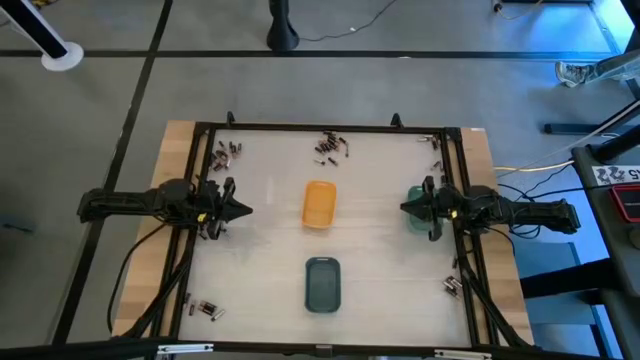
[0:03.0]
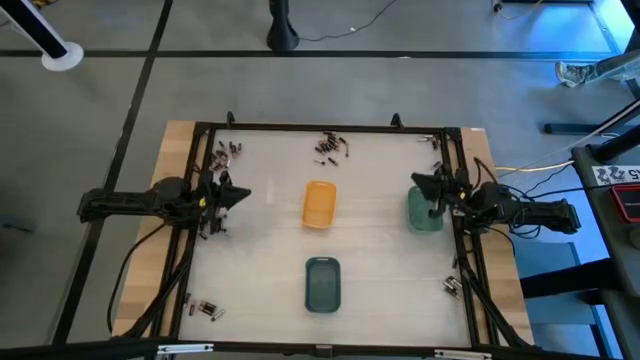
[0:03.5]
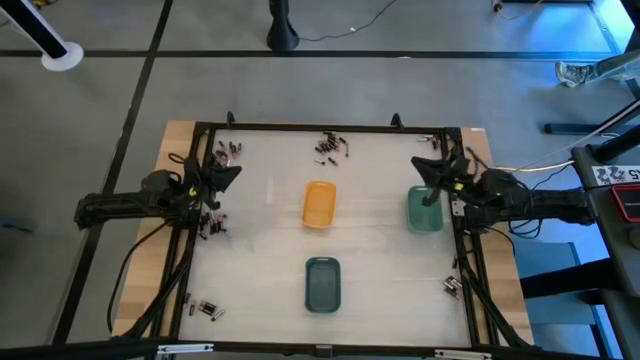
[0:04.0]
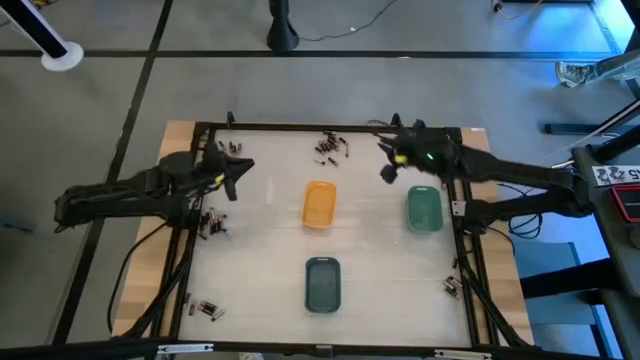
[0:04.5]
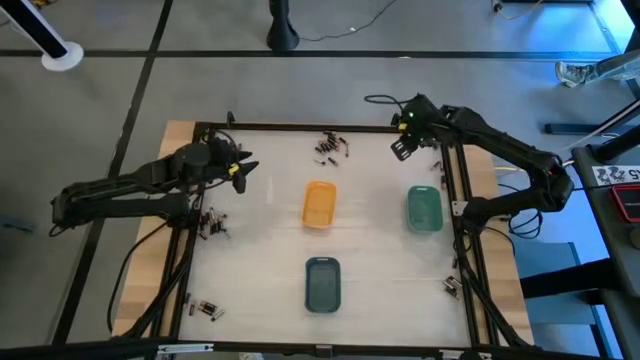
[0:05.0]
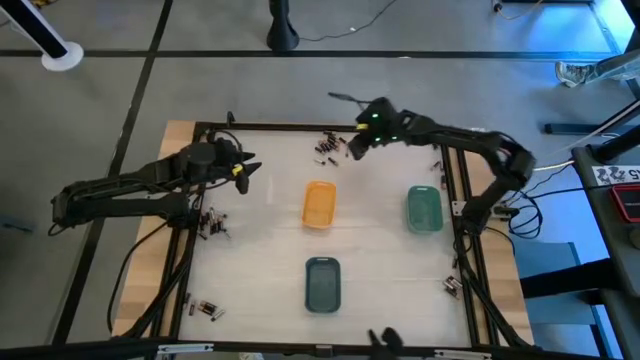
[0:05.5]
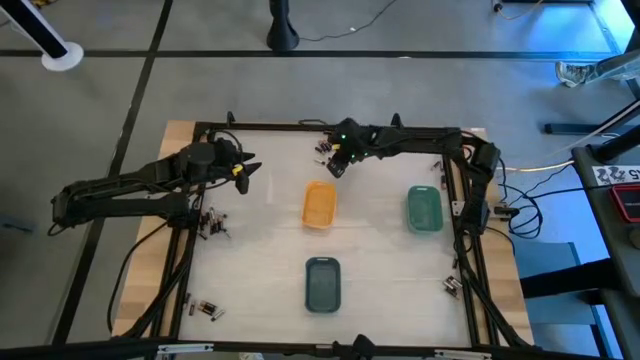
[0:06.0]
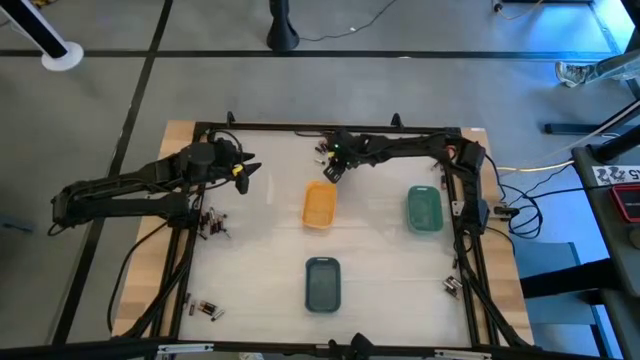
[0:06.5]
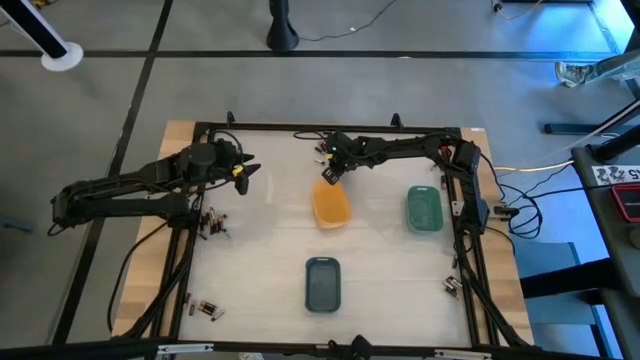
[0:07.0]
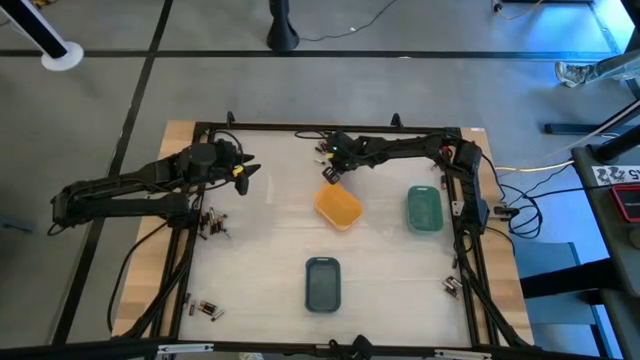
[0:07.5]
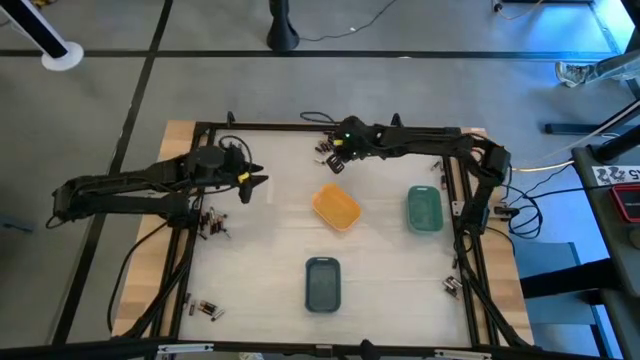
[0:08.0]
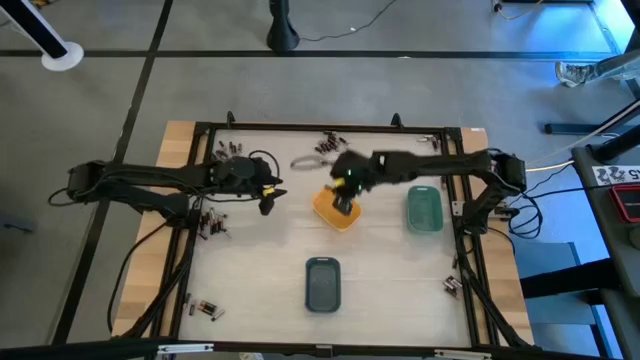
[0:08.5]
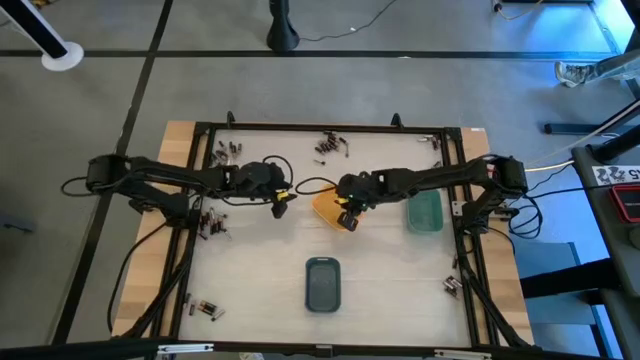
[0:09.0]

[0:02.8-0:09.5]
Task: Sort batteries
Put the black battery into the yellow bin

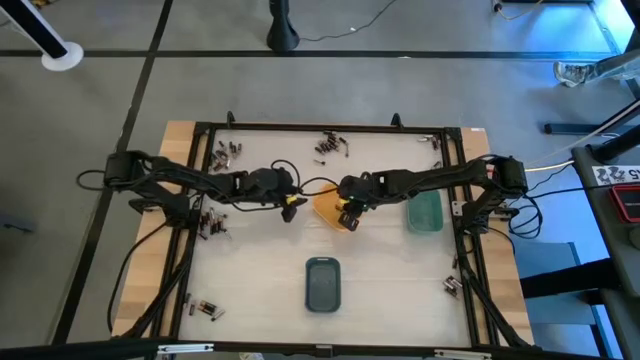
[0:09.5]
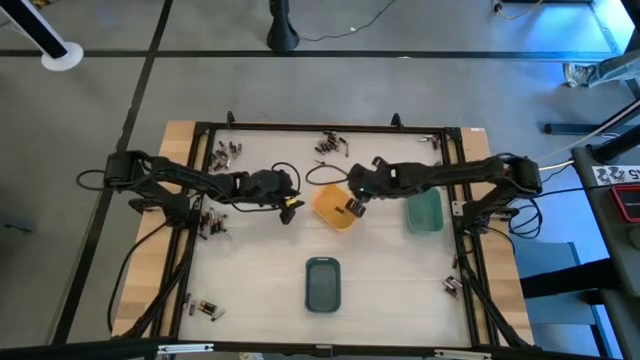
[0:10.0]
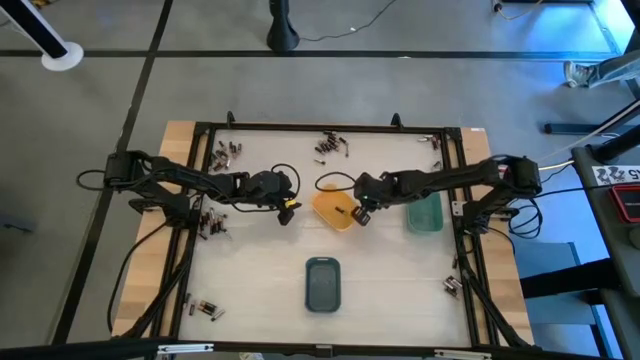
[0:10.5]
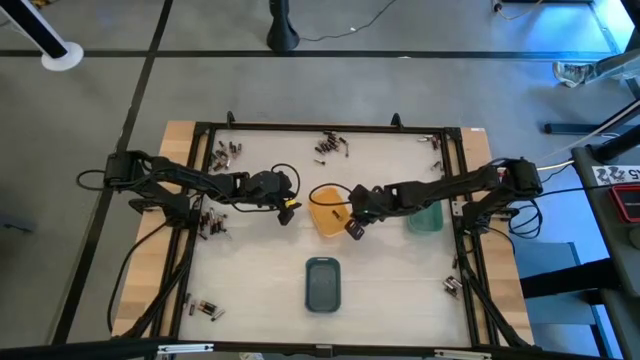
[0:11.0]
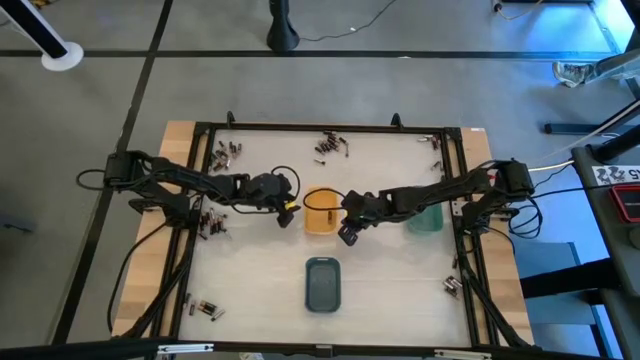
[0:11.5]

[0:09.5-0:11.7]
Adjust the yellow bin

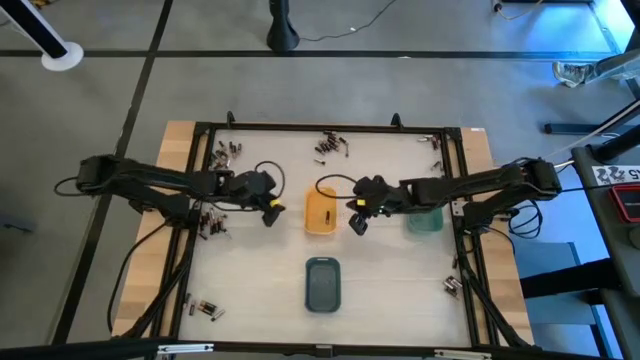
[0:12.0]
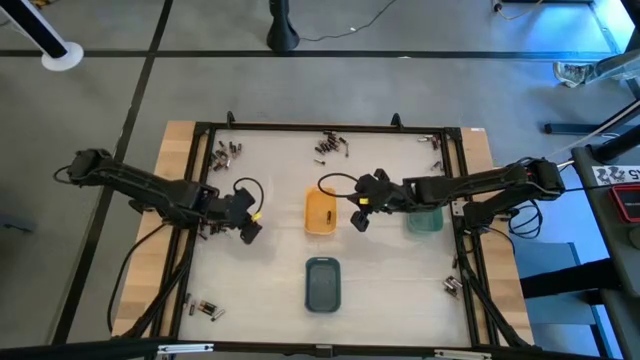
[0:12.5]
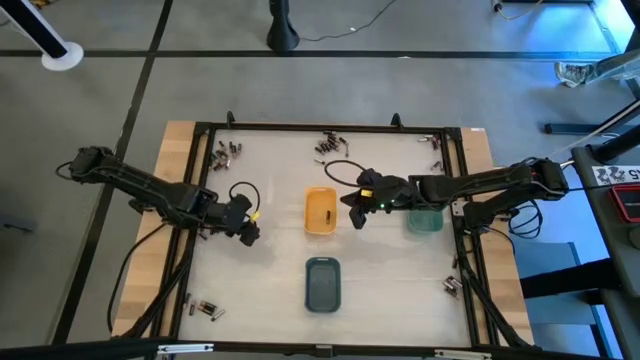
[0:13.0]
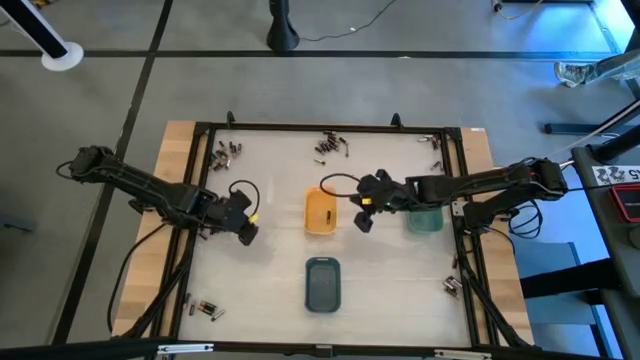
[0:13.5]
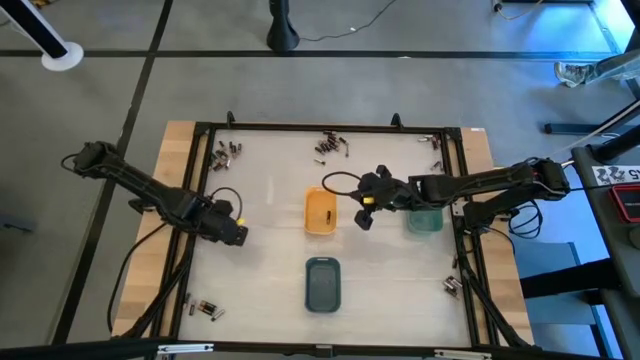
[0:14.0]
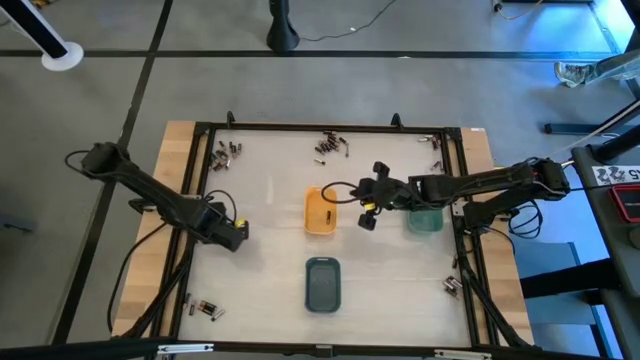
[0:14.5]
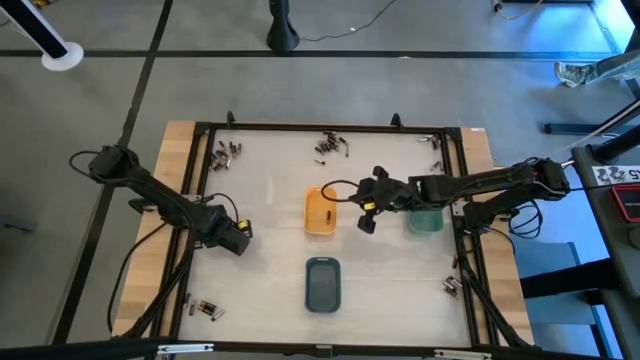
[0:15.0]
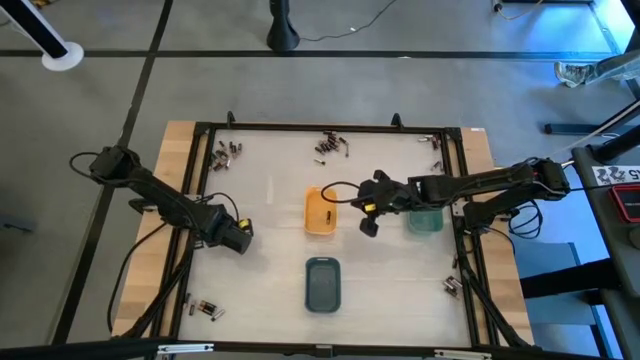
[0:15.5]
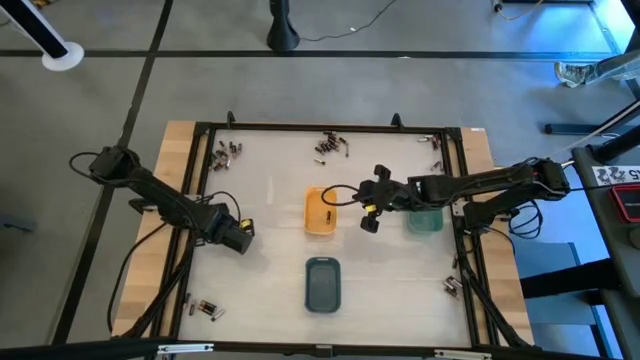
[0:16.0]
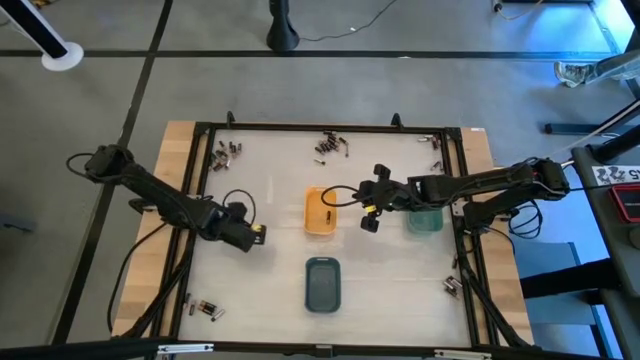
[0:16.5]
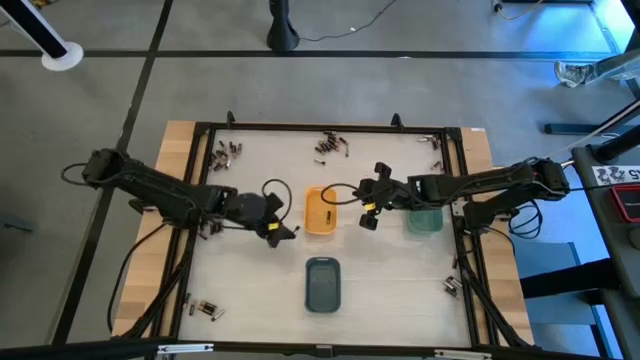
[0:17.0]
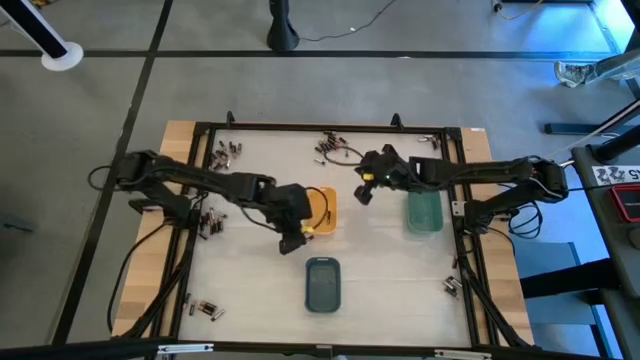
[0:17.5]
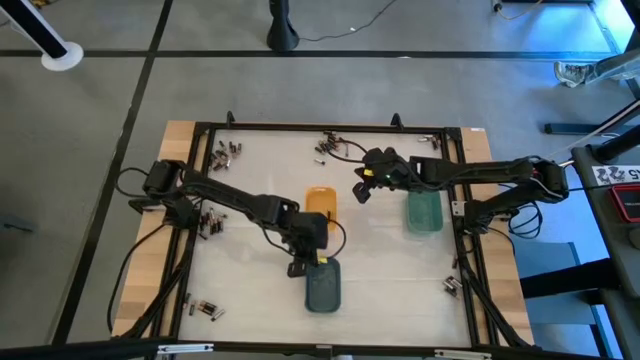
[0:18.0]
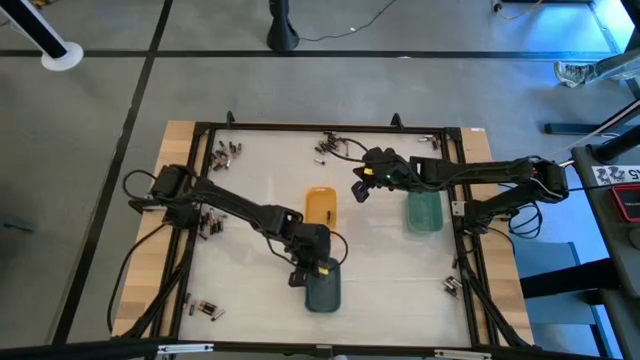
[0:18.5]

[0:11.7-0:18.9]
Put the silver battery into the blue bin

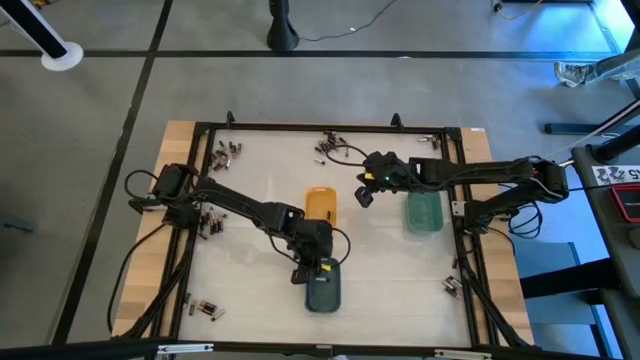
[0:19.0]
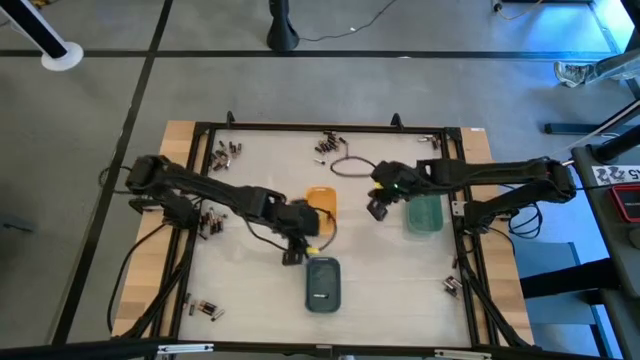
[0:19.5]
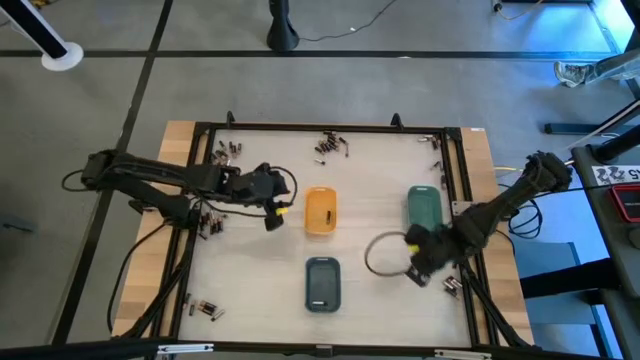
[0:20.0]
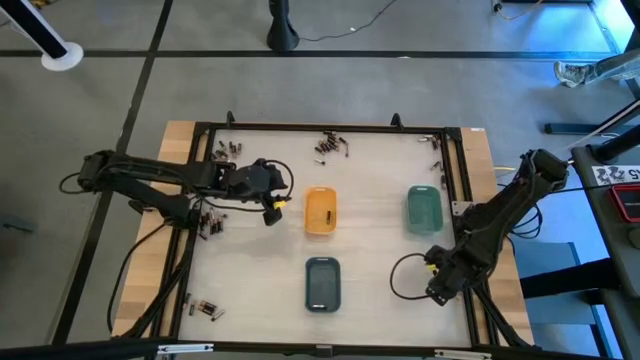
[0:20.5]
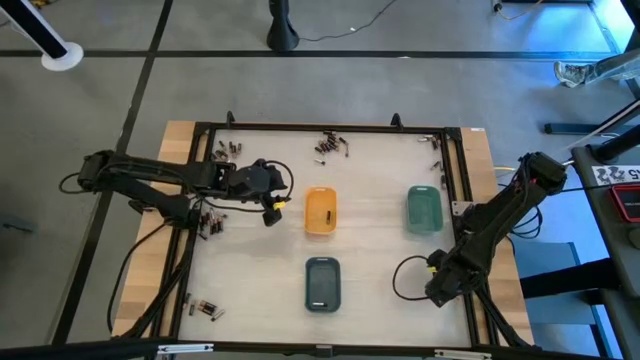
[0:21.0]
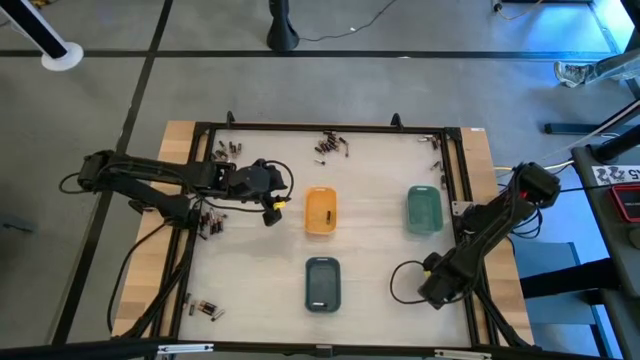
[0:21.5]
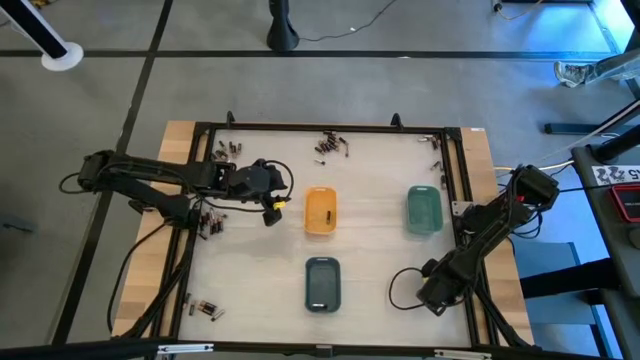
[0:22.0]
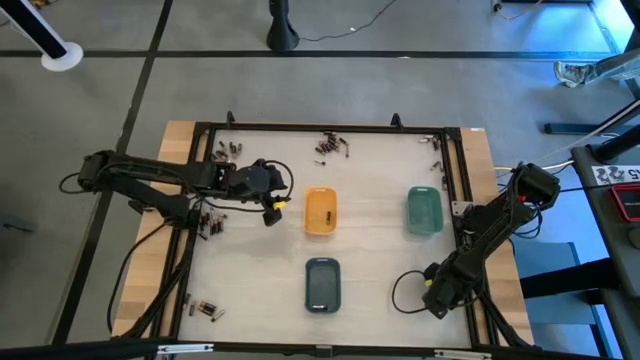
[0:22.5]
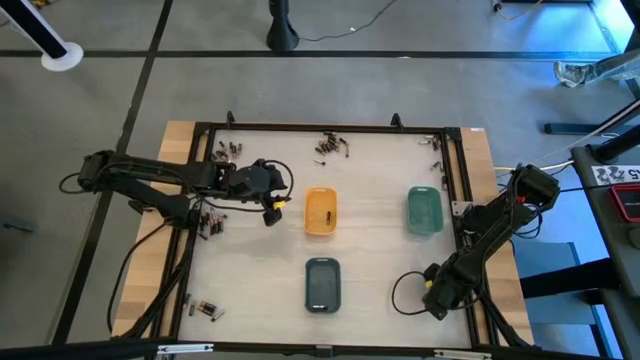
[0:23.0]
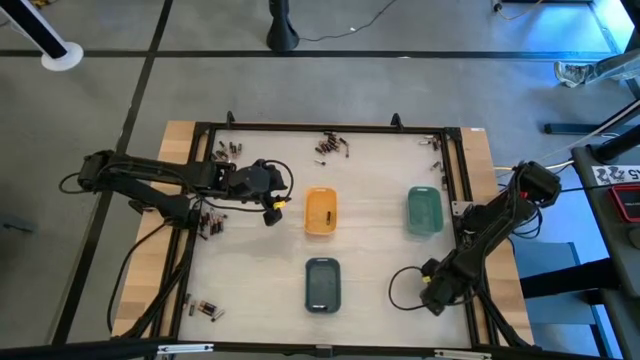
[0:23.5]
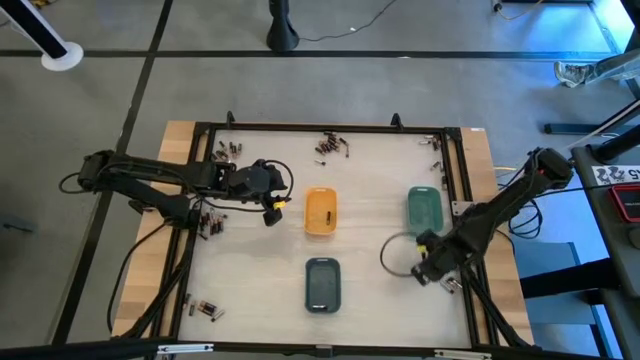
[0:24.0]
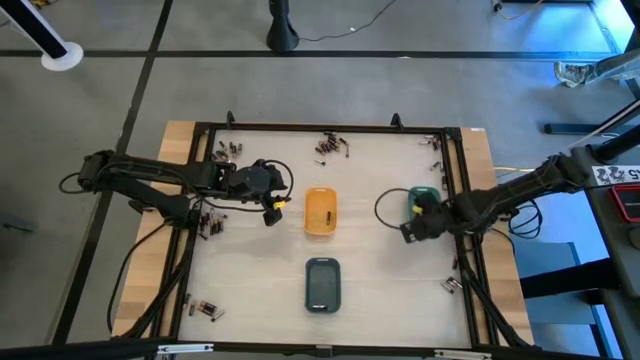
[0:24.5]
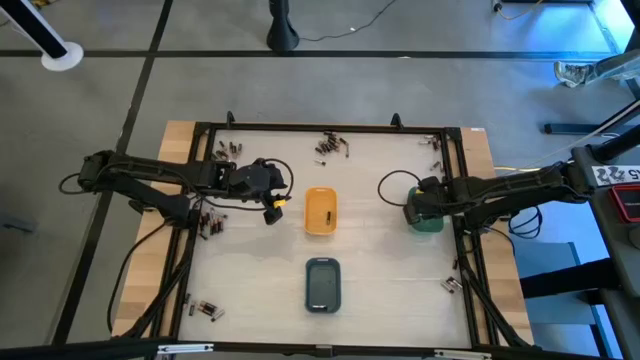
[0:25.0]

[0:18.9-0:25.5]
Put the black battery into the green bin
